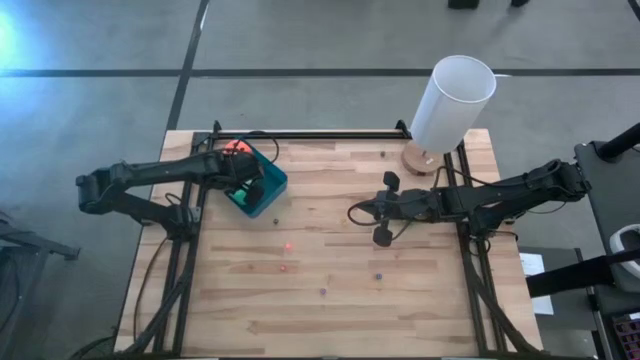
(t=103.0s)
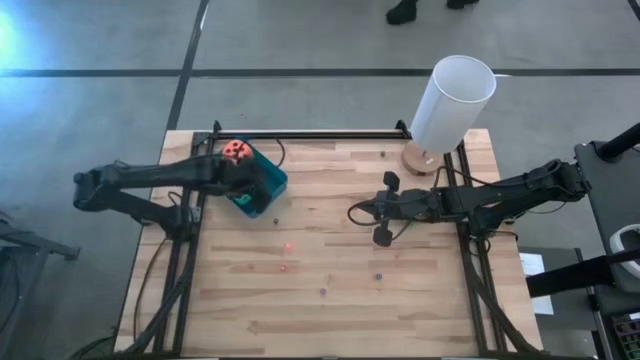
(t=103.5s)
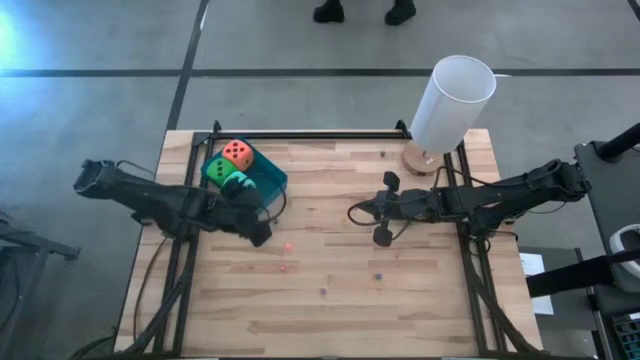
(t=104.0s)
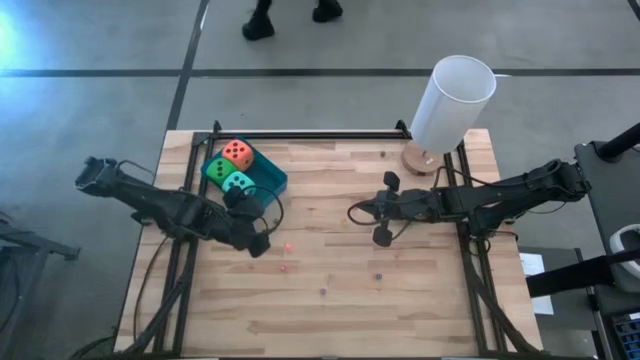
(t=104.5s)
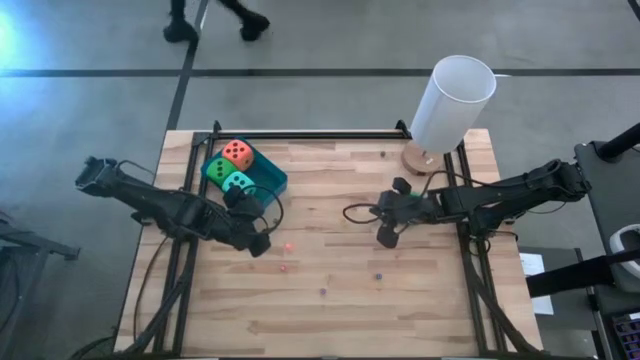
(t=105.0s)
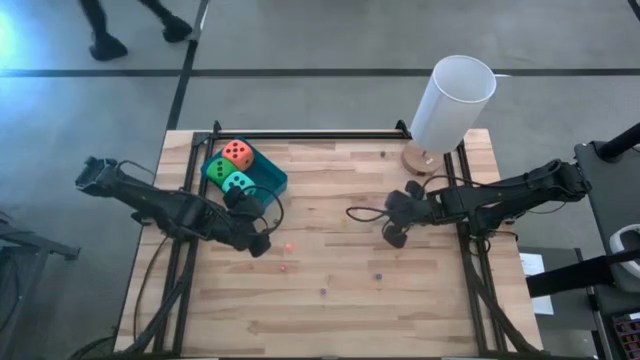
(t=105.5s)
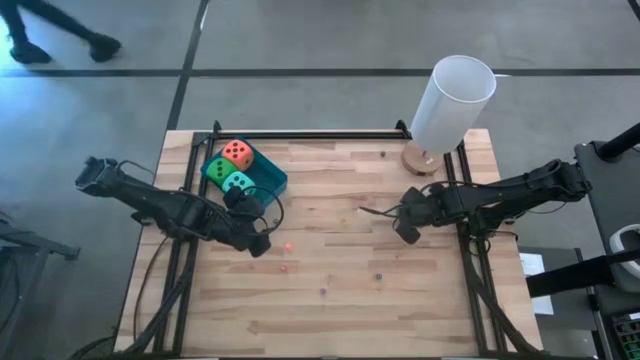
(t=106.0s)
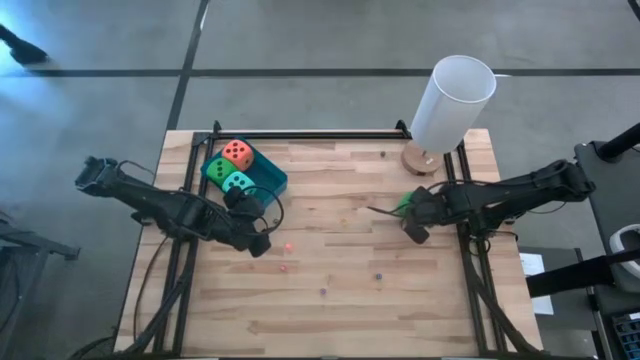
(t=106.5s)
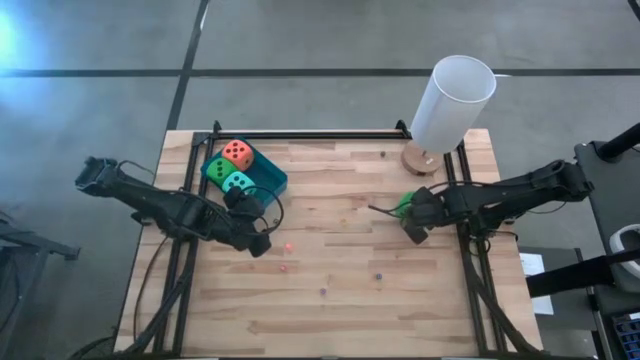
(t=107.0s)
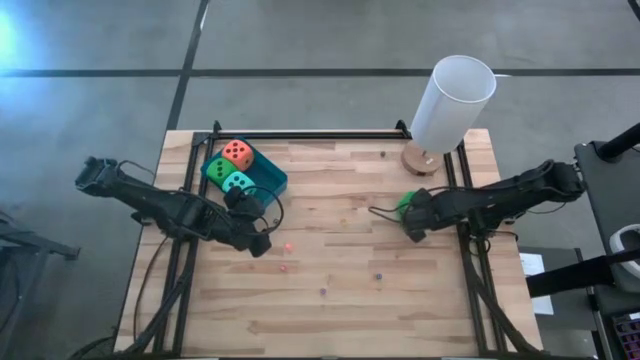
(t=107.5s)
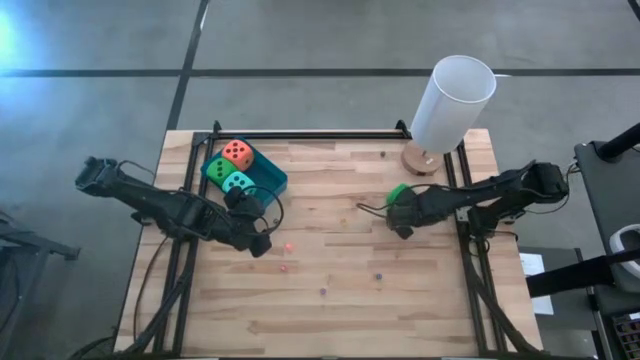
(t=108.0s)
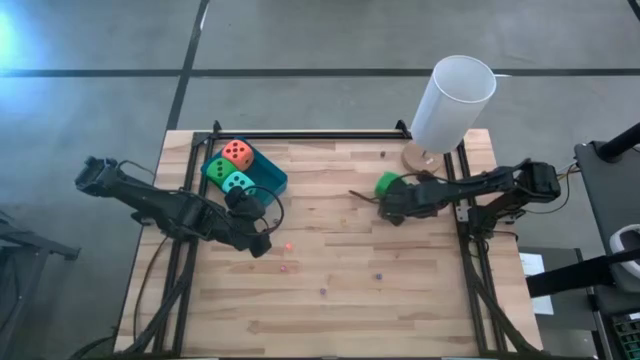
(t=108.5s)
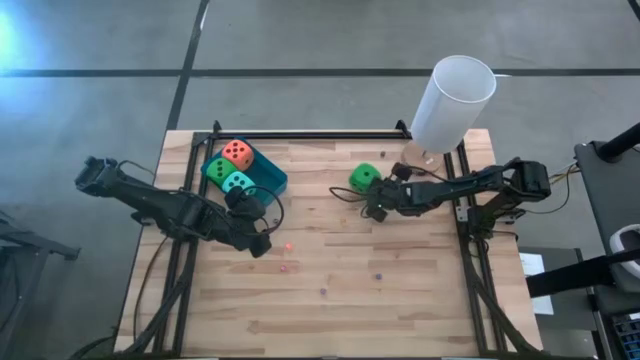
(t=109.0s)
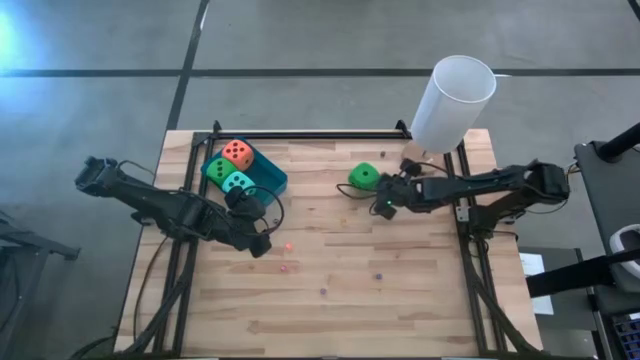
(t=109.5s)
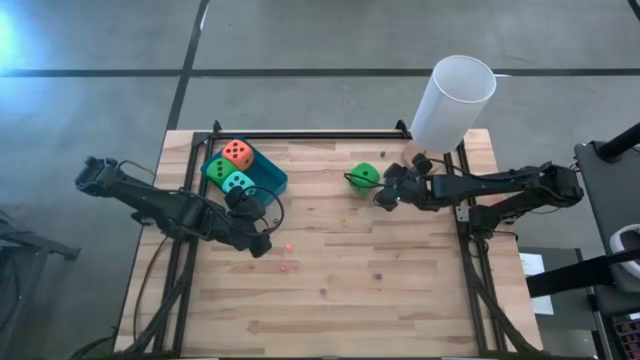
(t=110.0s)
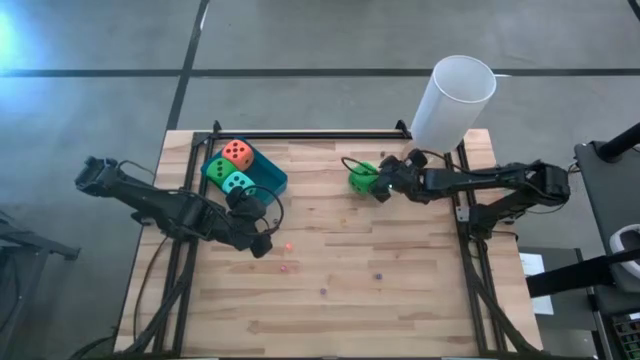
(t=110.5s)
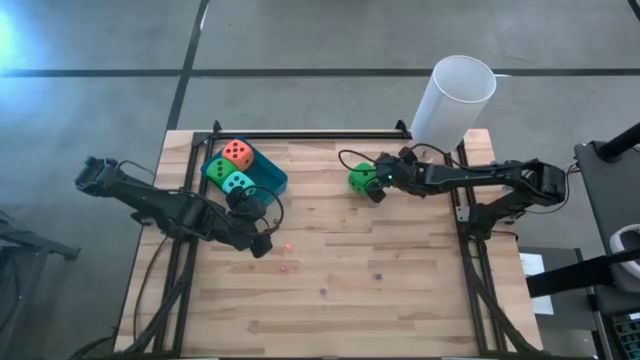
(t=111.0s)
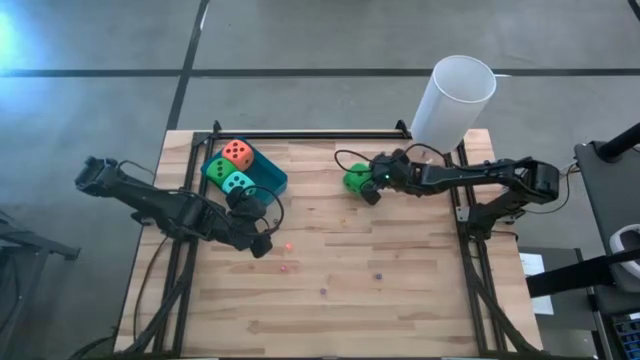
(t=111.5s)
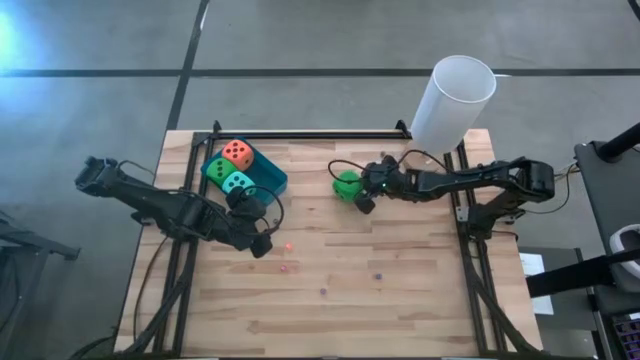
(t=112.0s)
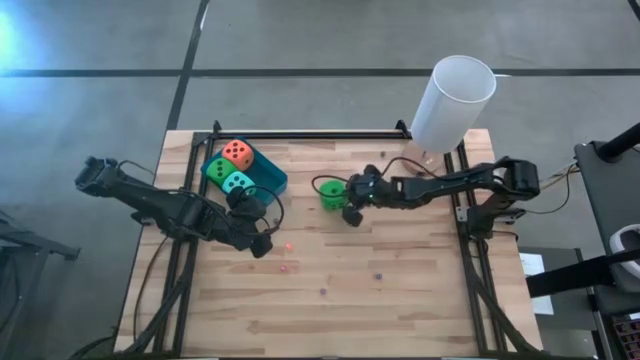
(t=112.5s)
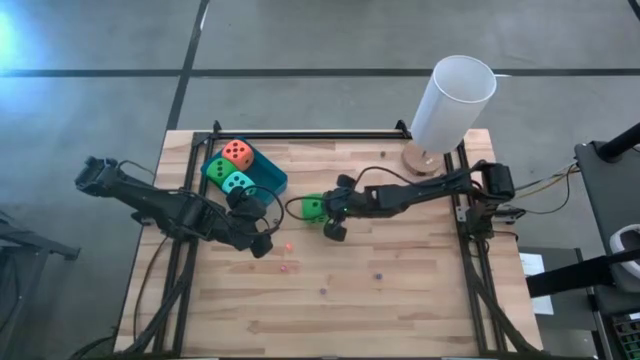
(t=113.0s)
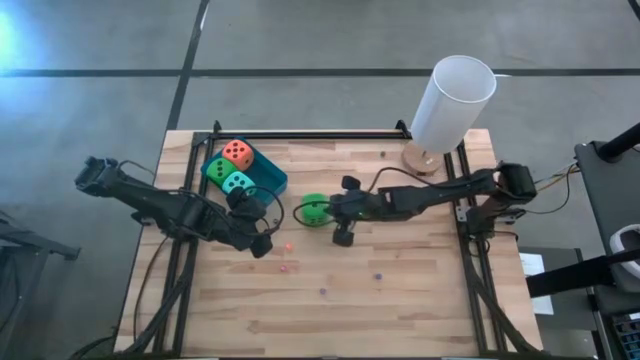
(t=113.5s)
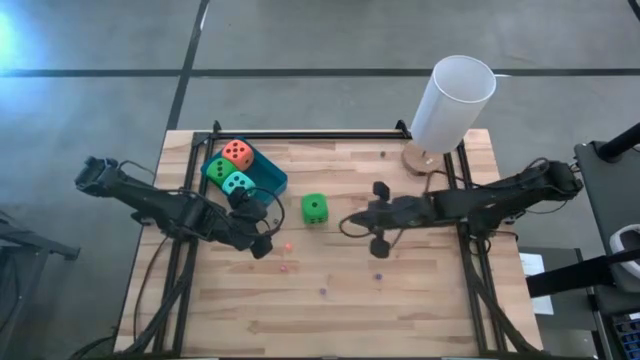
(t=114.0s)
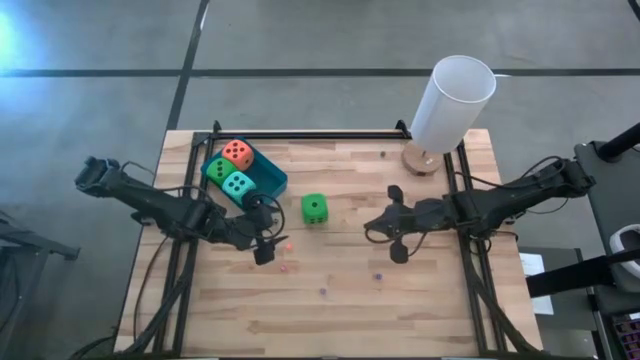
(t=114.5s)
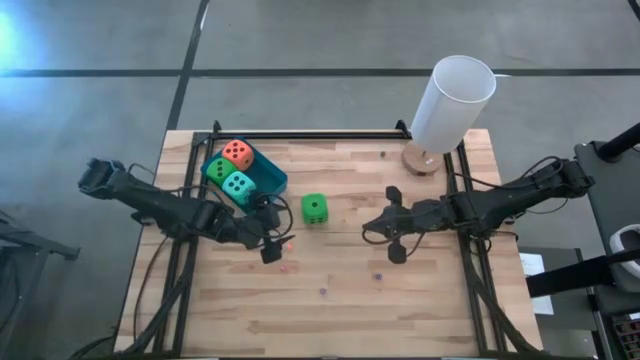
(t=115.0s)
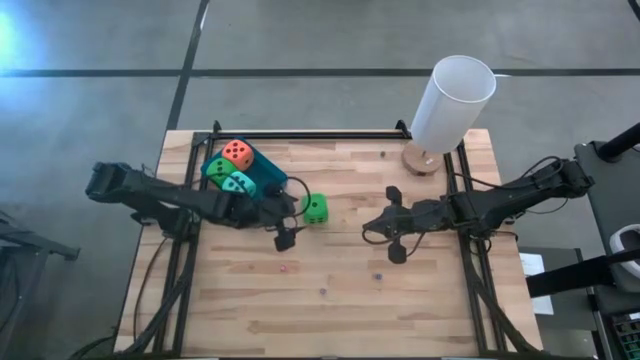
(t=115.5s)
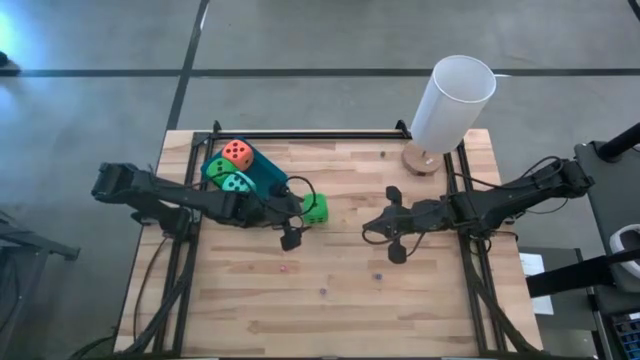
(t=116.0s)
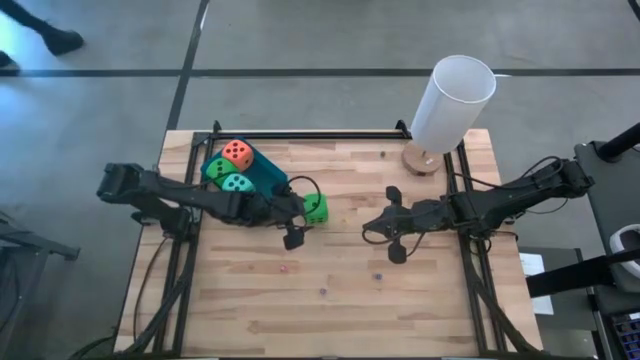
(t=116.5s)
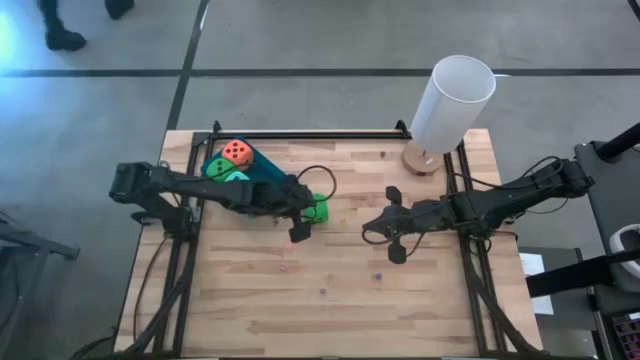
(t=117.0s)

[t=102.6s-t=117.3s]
Task: Pick & Place Dice
Put the big green dice into the blue bin

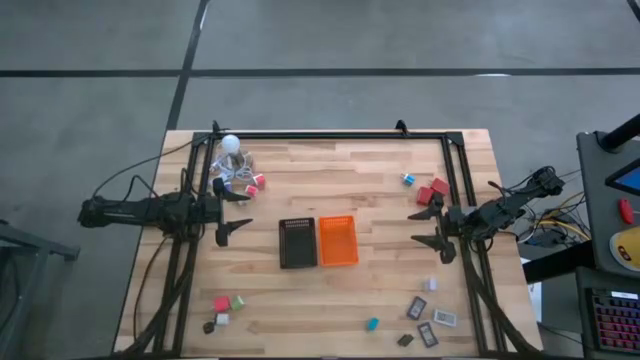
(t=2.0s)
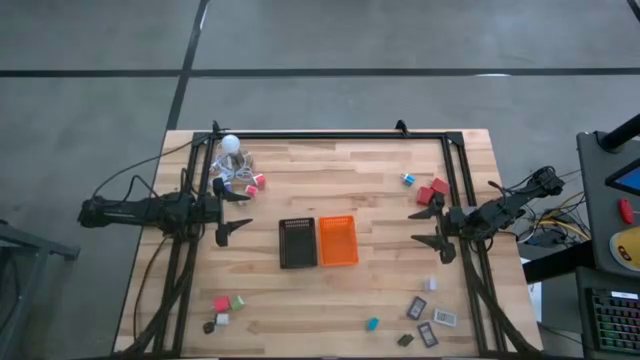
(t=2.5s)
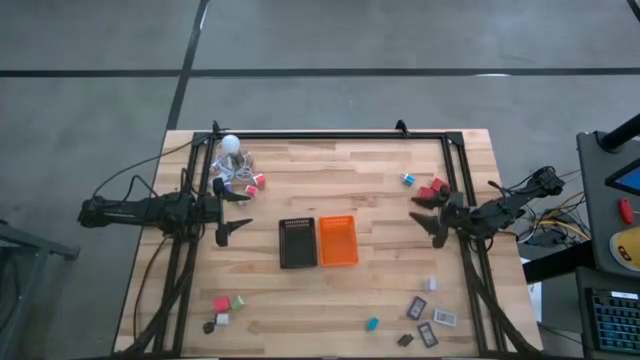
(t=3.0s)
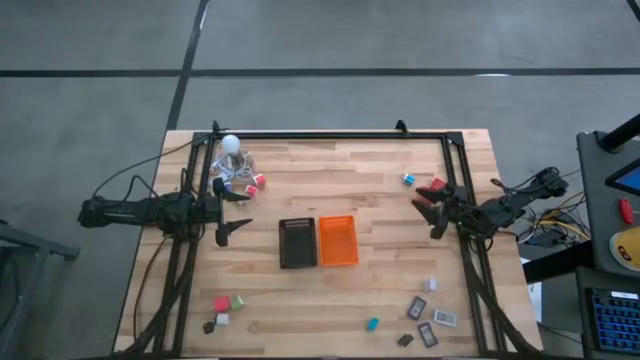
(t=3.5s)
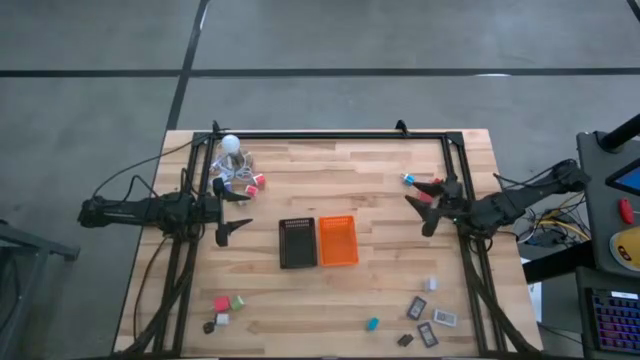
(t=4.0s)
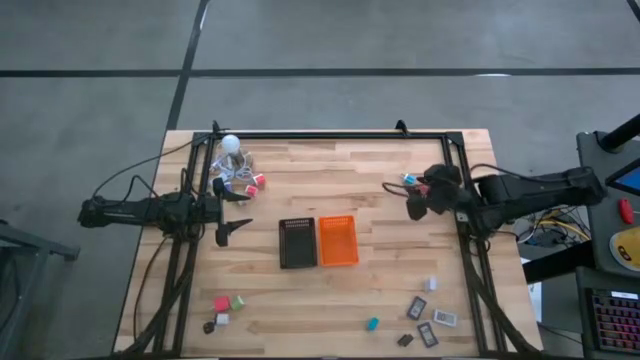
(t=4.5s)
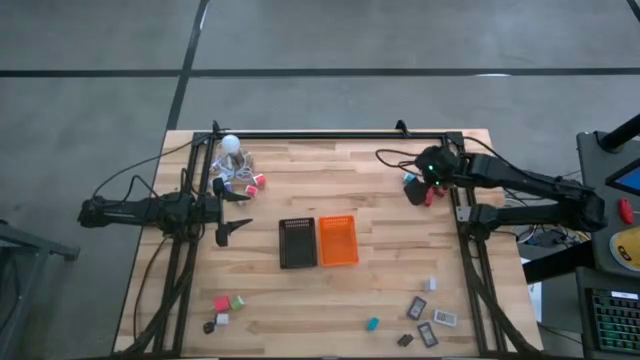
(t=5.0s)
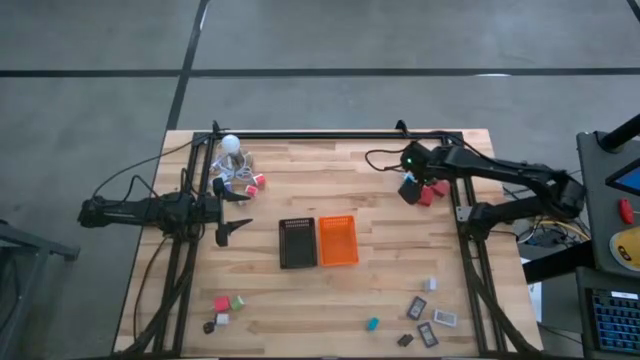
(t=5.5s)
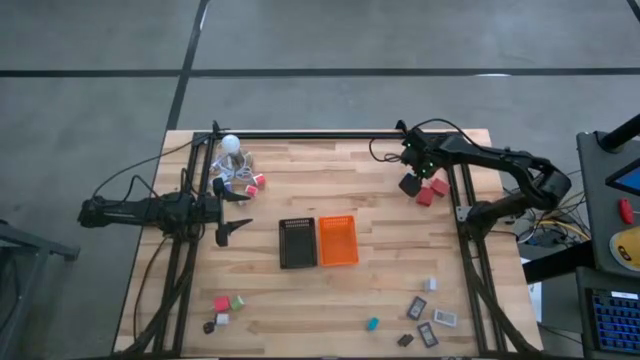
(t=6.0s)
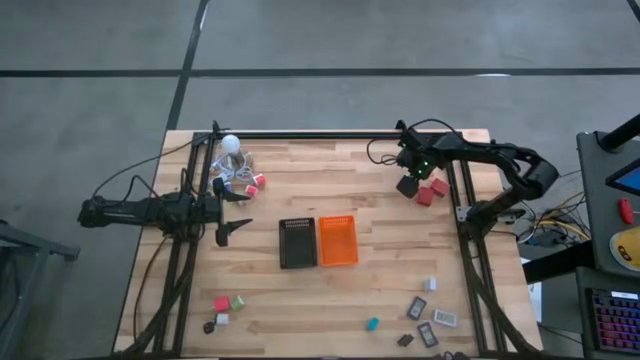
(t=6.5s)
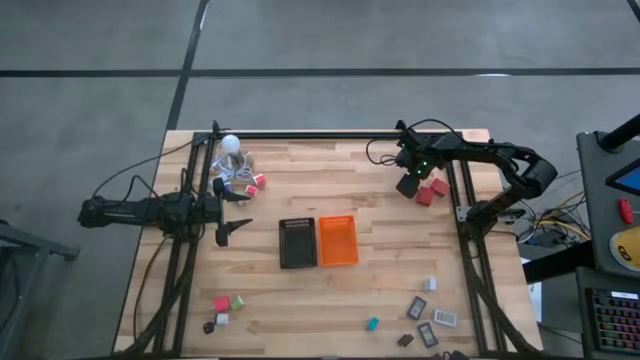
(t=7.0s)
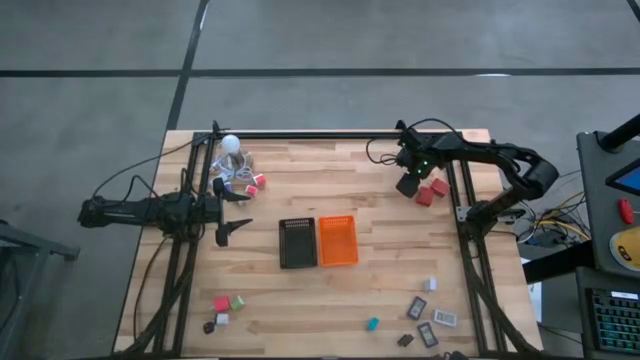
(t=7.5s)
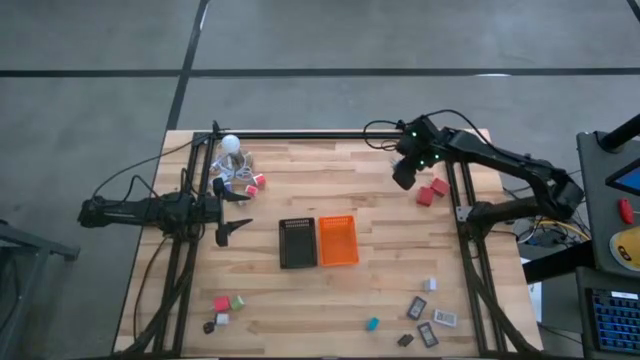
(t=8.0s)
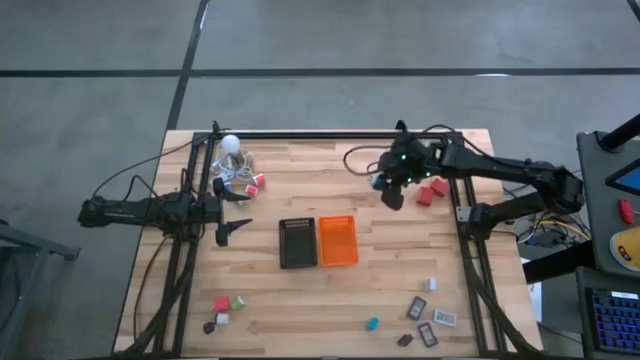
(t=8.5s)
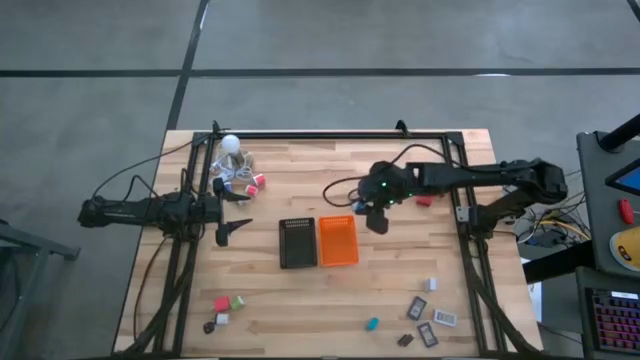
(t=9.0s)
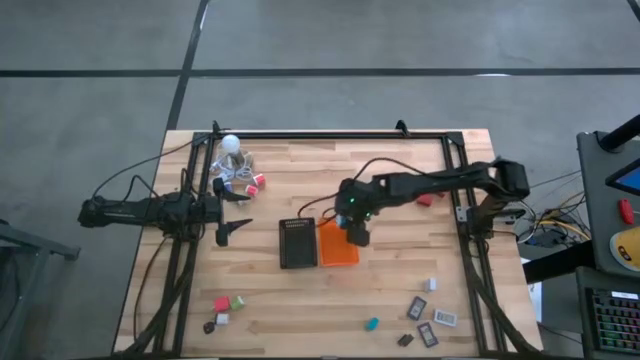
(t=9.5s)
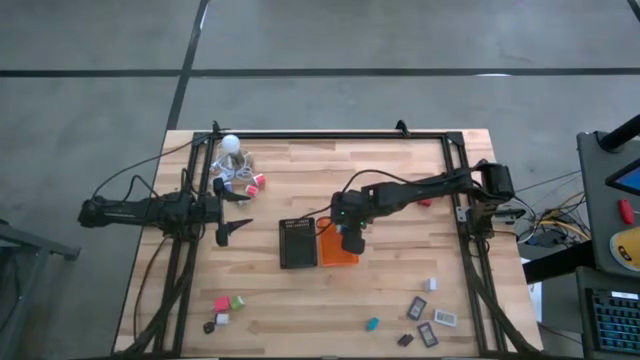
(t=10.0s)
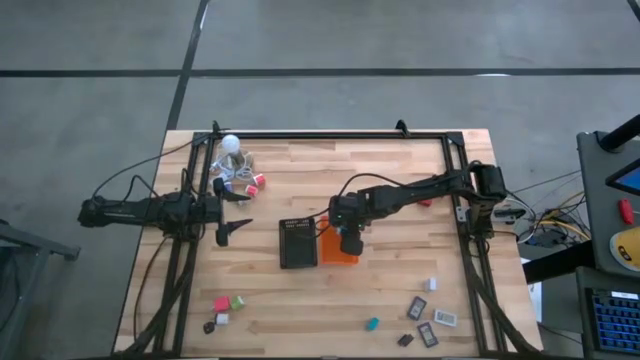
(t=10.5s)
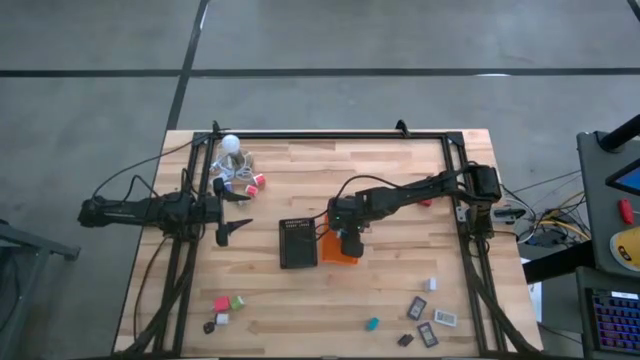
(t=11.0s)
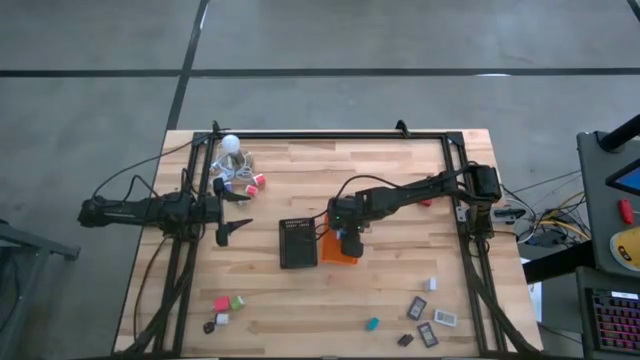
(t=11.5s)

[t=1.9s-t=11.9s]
Task: Pick & Place Office items
Put the blue charger adapter into the orange bin
